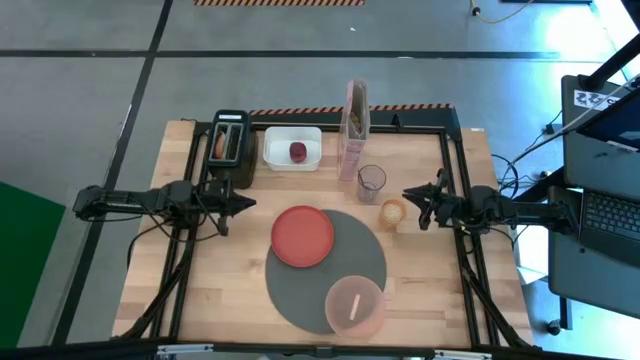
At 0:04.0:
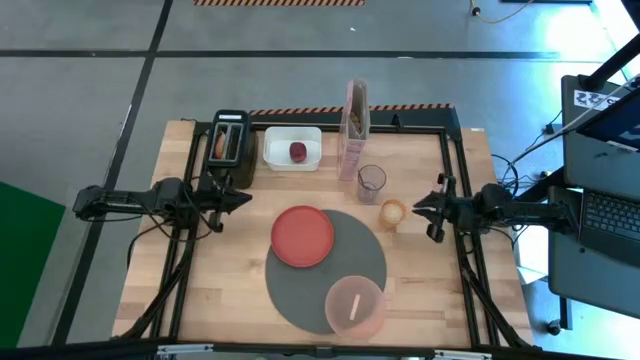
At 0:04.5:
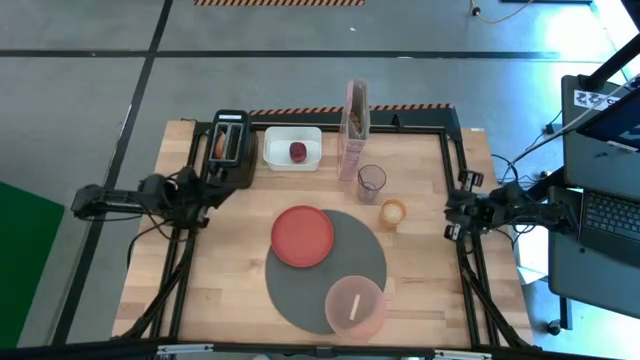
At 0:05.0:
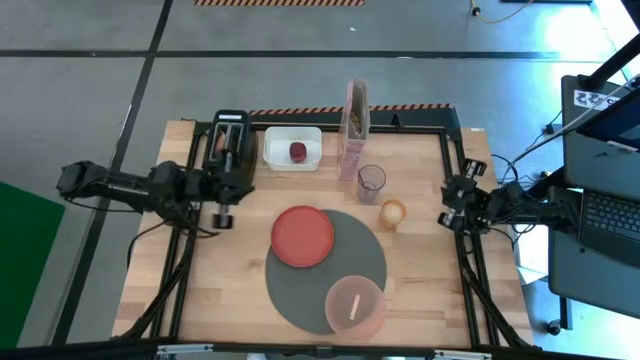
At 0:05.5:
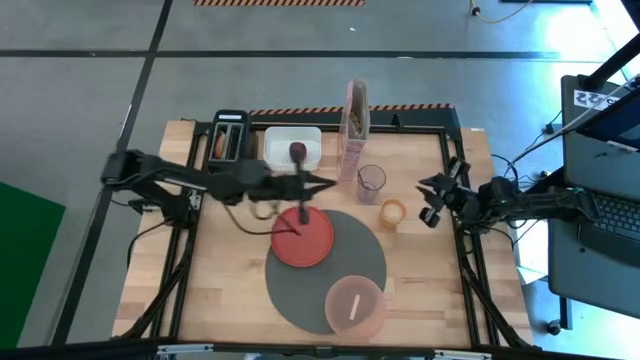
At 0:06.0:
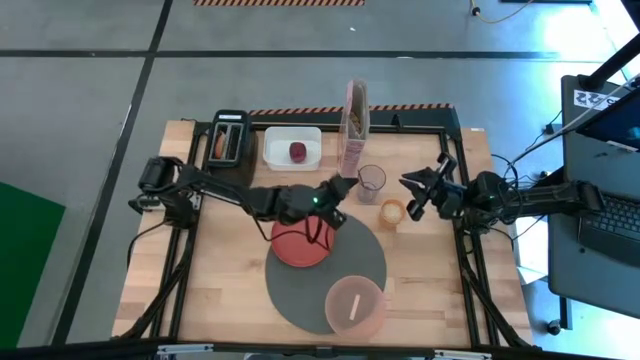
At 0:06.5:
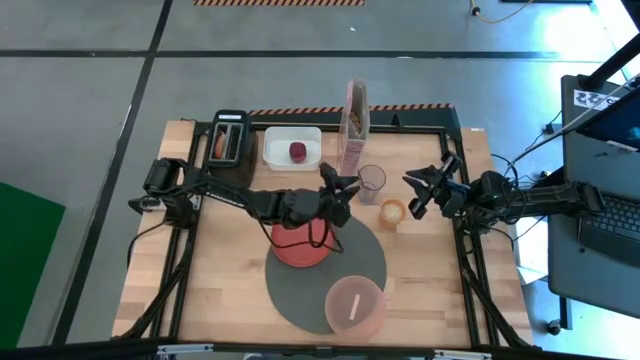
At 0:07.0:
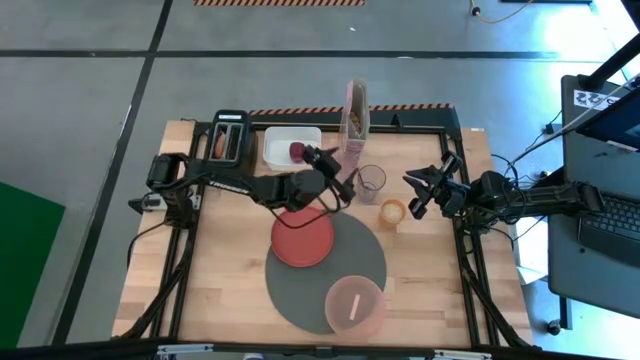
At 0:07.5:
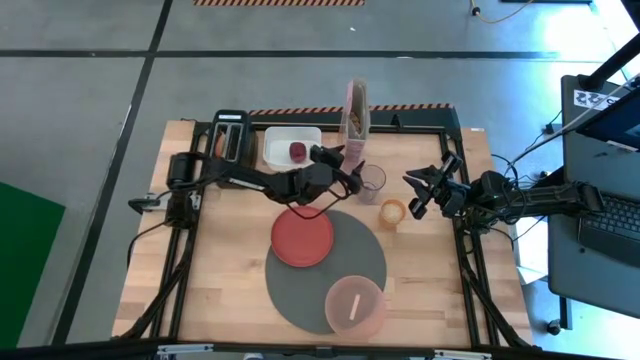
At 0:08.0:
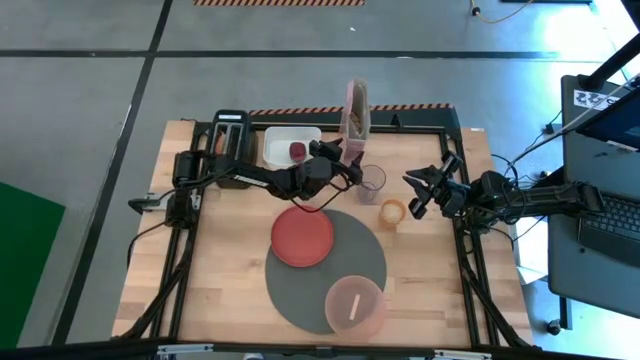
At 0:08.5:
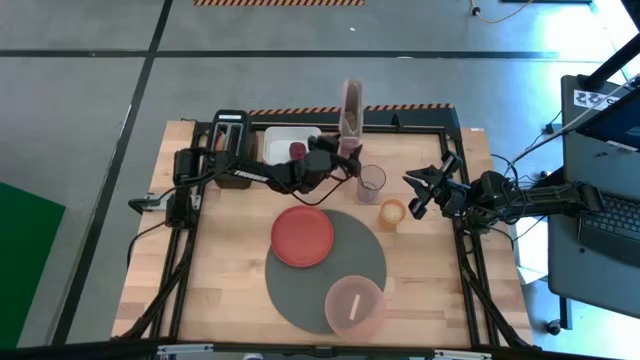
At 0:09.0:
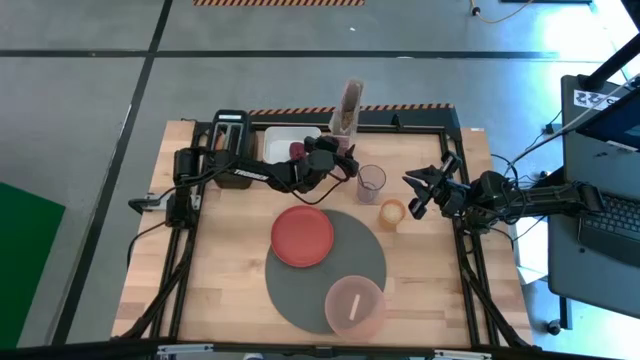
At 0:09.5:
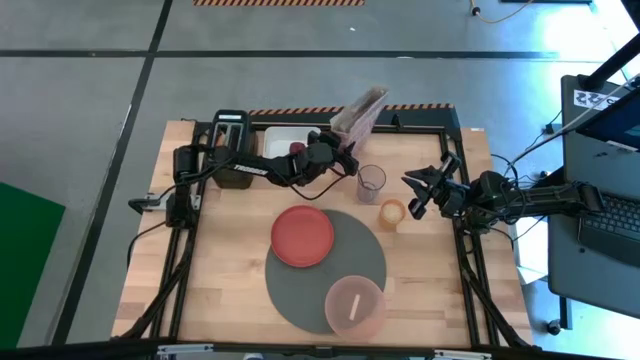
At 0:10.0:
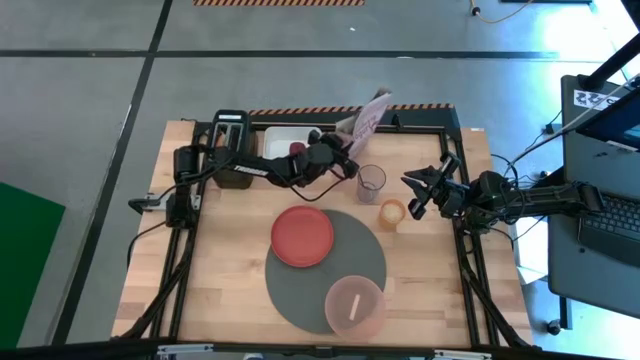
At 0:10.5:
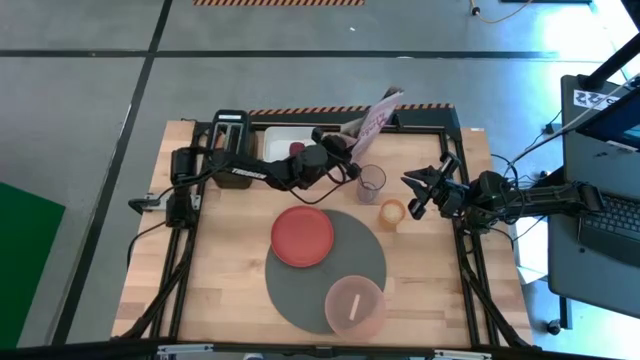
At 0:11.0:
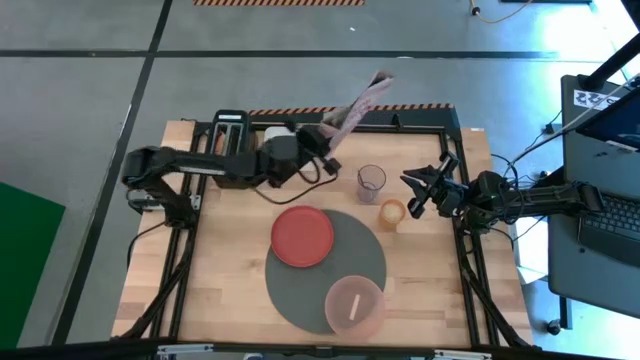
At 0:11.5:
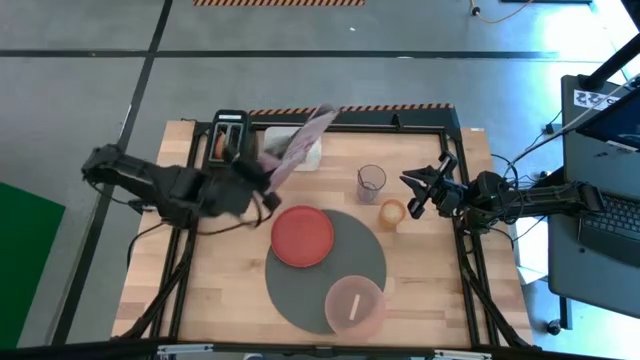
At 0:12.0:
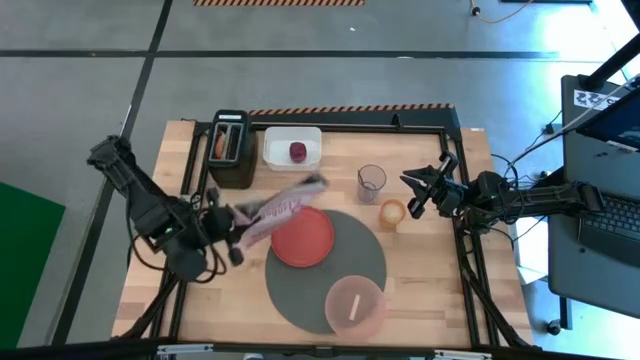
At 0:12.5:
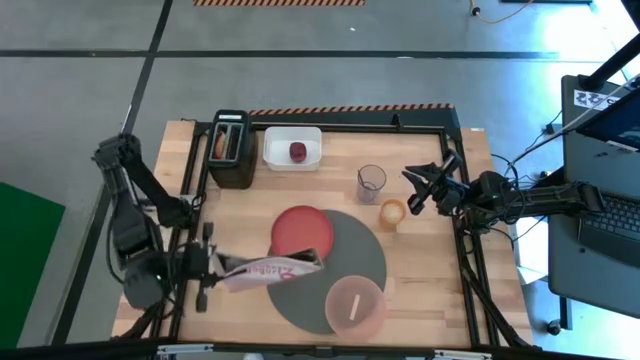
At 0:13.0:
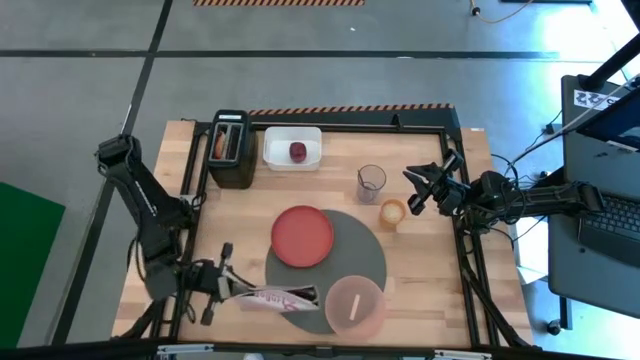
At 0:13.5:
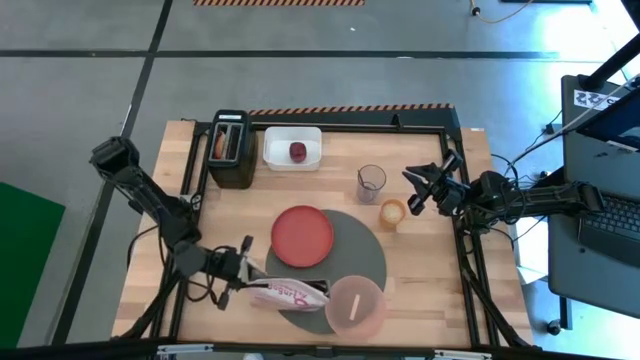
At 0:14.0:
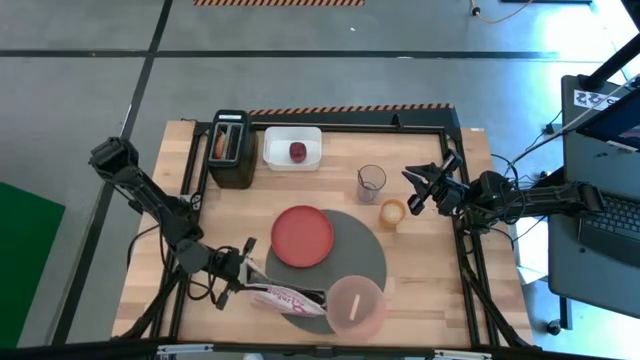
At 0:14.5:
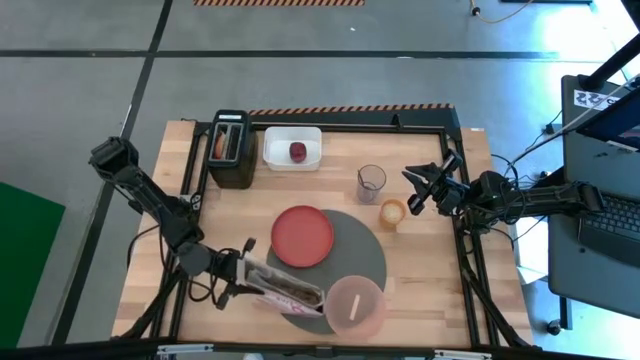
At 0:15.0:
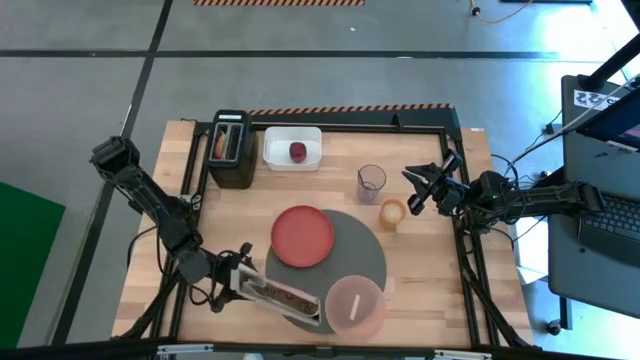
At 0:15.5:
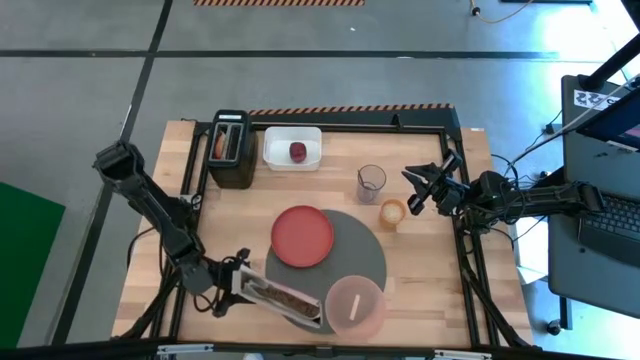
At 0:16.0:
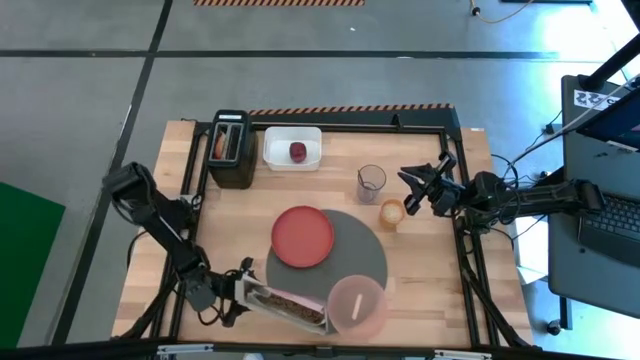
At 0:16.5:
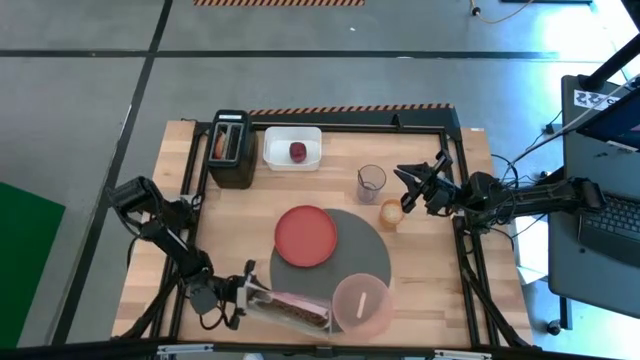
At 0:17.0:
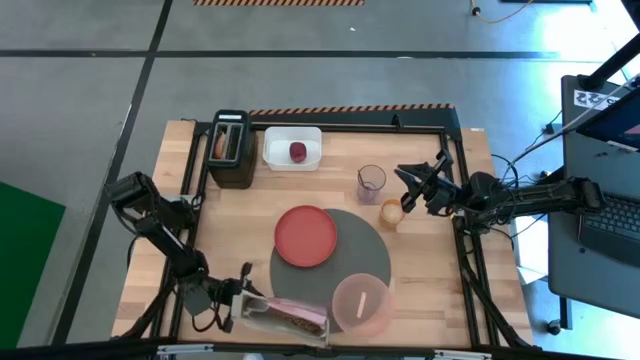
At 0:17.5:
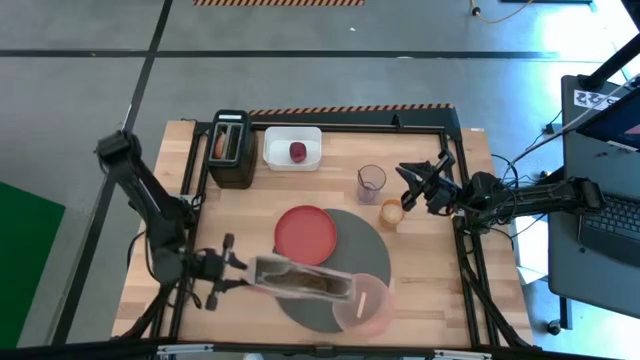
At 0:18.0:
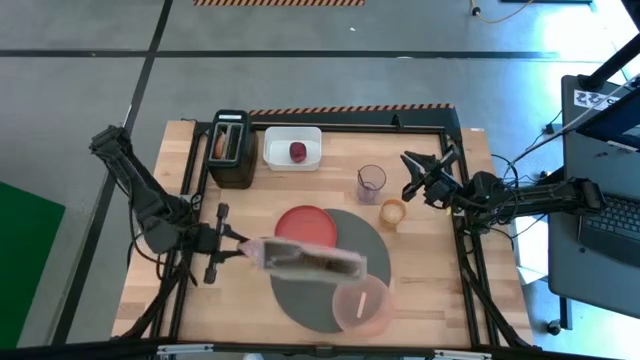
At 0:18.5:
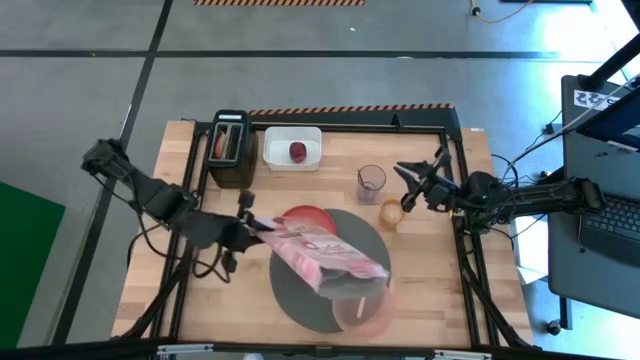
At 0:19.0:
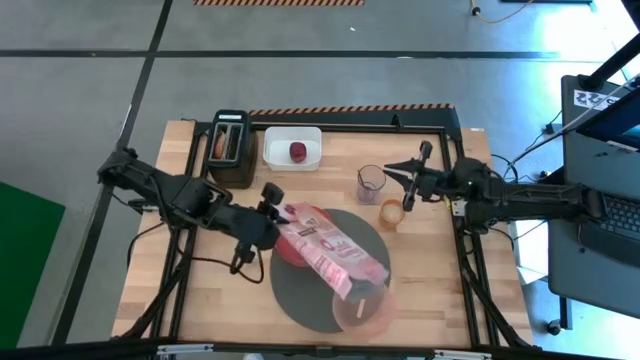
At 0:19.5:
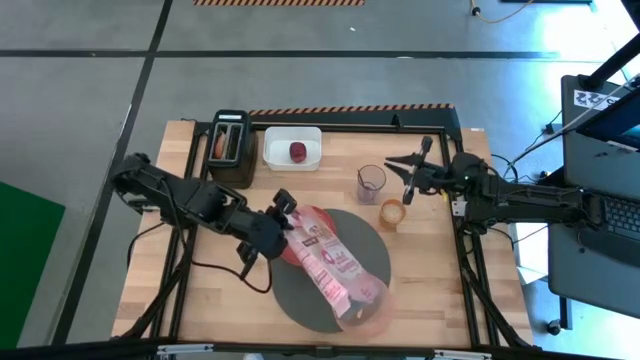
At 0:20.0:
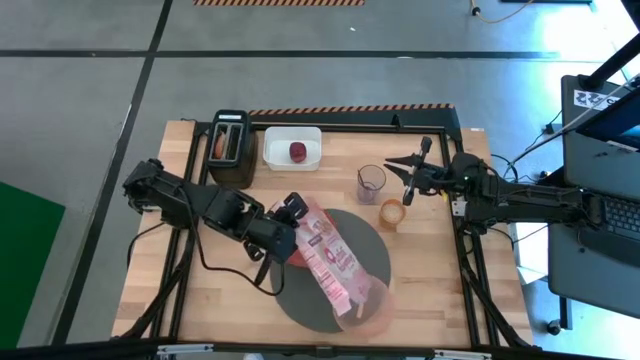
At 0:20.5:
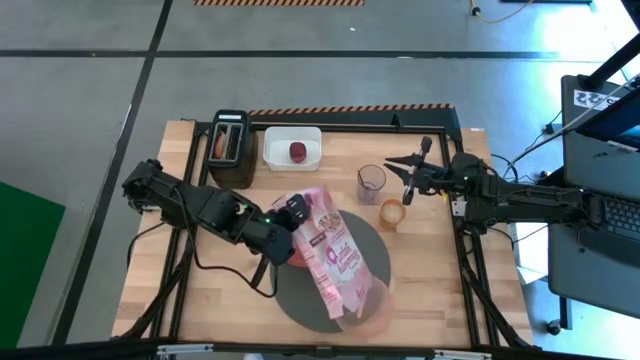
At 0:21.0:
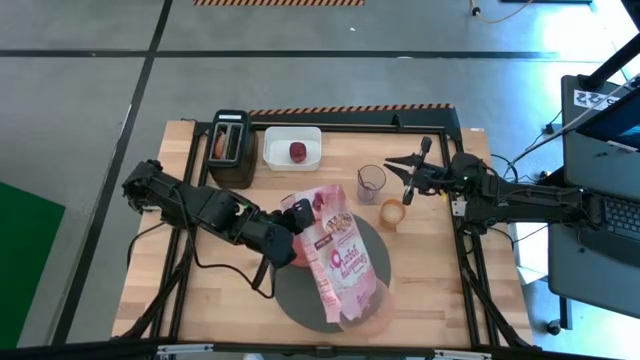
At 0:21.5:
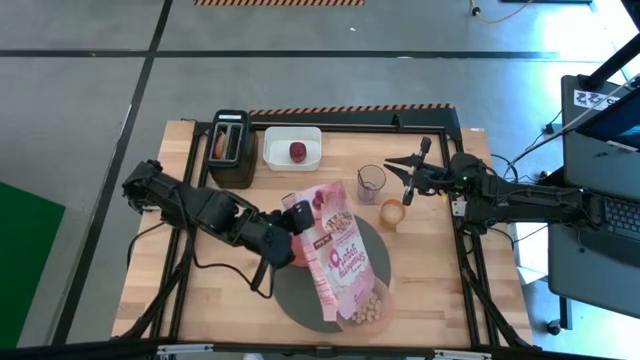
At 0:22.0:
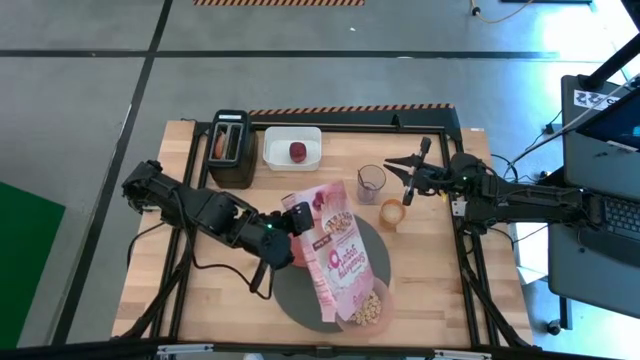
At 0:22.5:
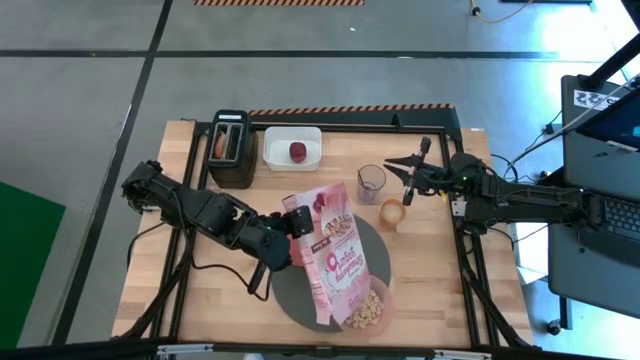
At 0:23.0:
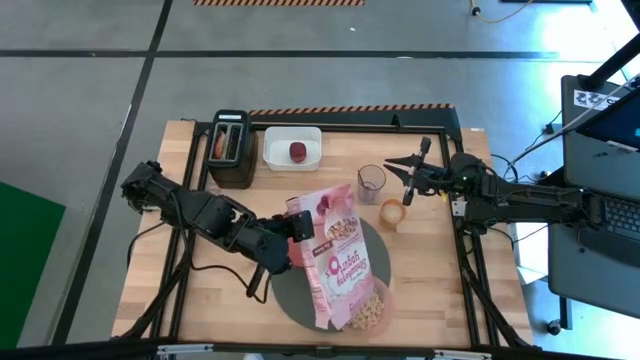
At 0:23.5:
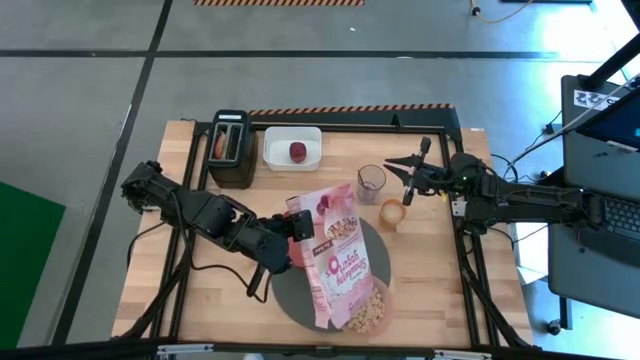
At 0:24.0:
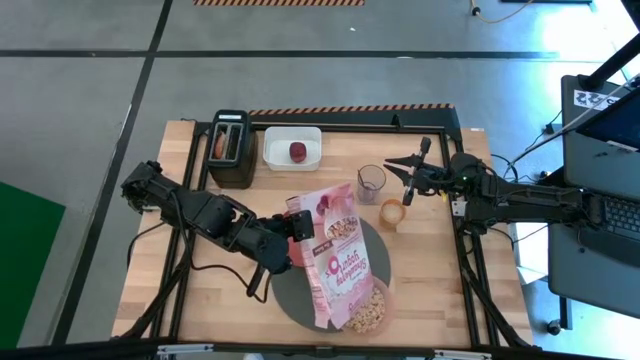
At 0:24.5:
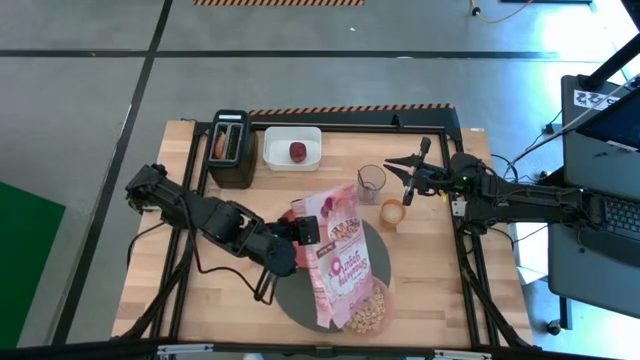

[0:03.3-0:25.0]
Task: Arrange a breakfast setting
Pour the cereal into the pink bowl
